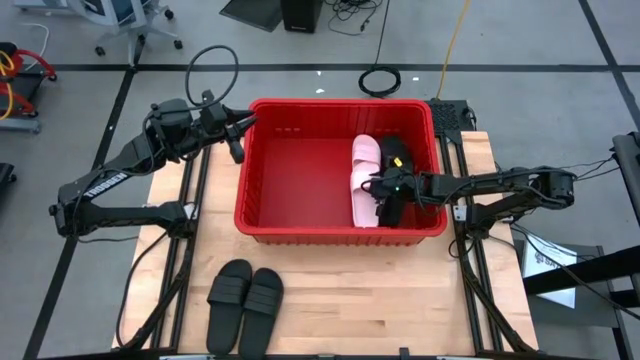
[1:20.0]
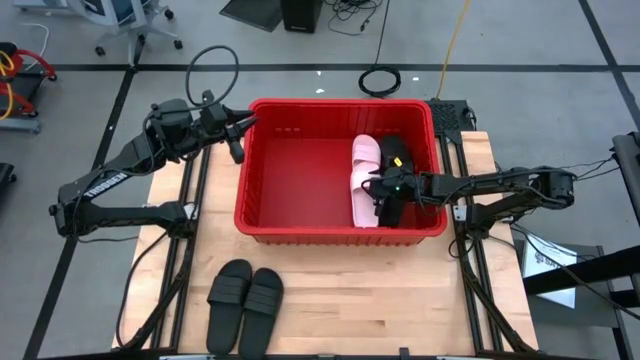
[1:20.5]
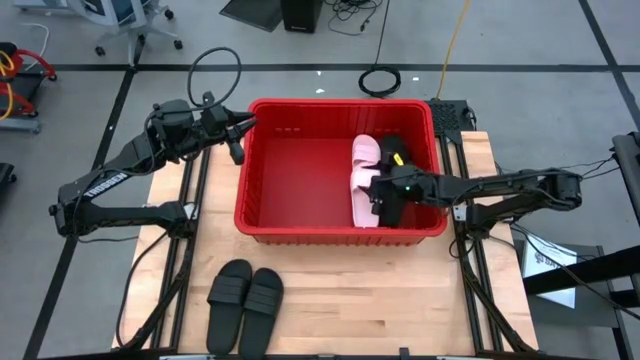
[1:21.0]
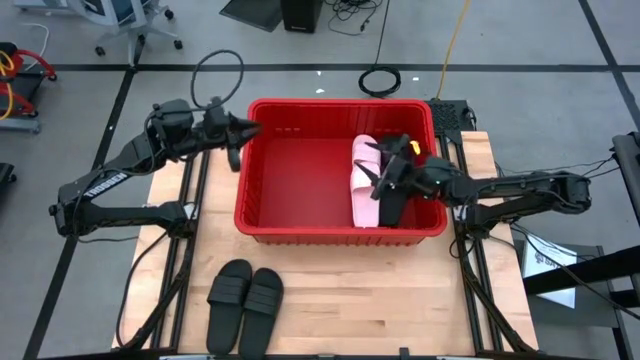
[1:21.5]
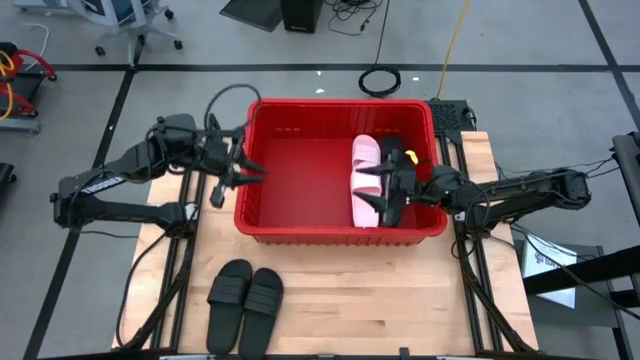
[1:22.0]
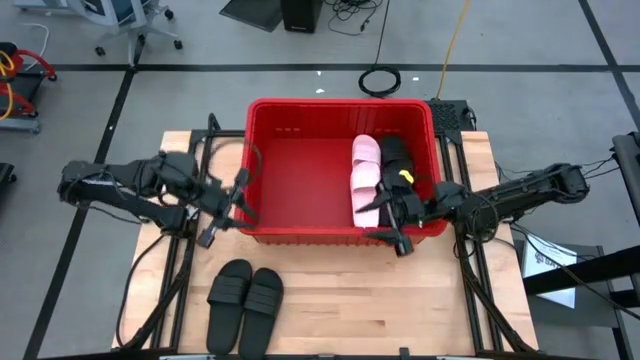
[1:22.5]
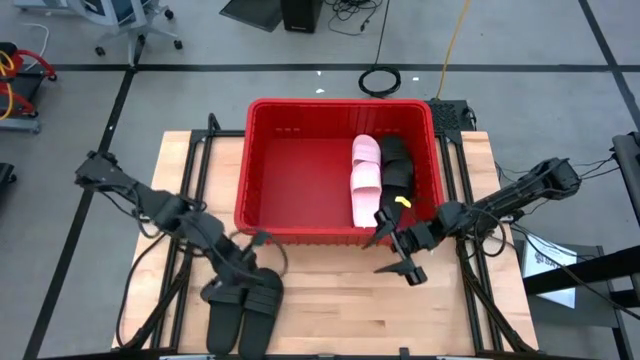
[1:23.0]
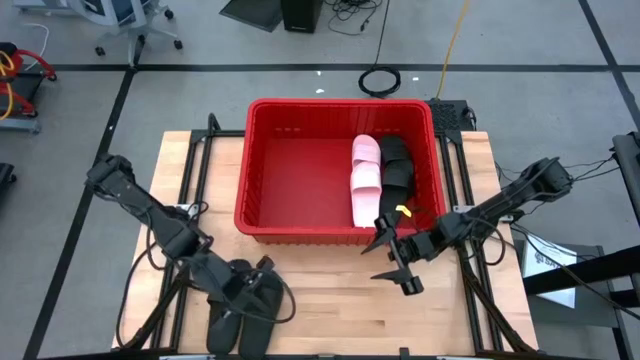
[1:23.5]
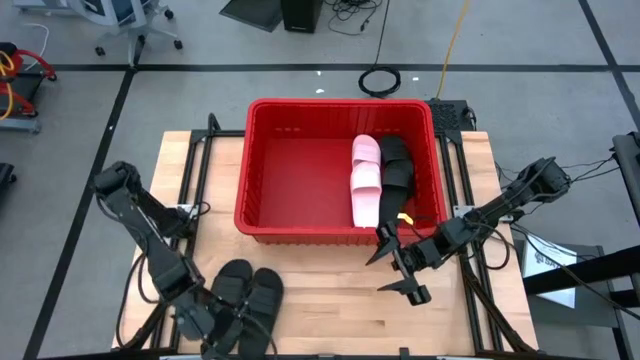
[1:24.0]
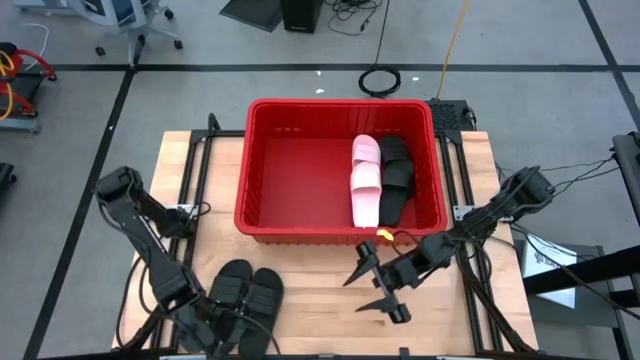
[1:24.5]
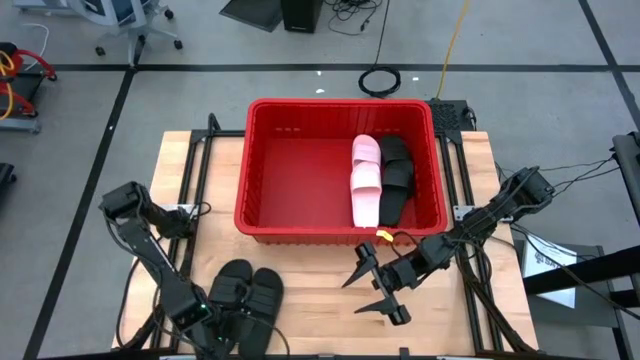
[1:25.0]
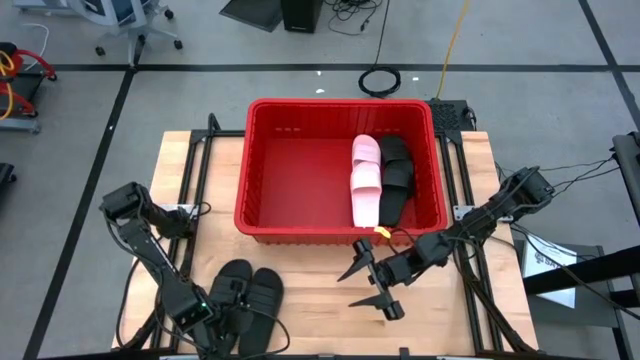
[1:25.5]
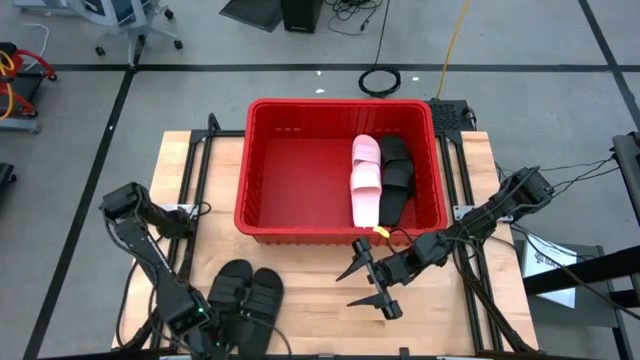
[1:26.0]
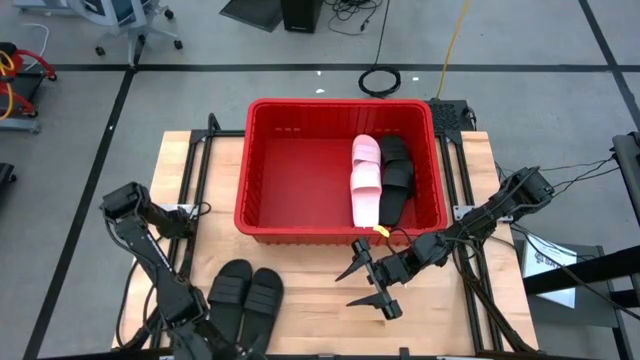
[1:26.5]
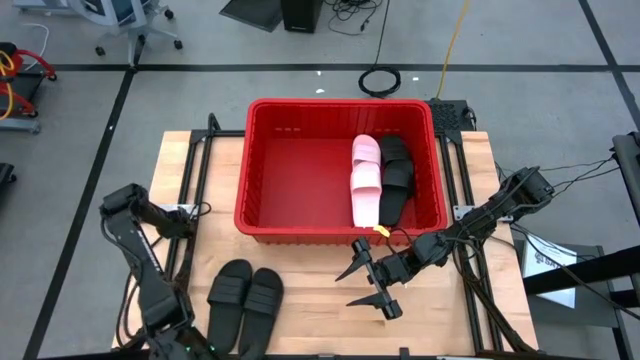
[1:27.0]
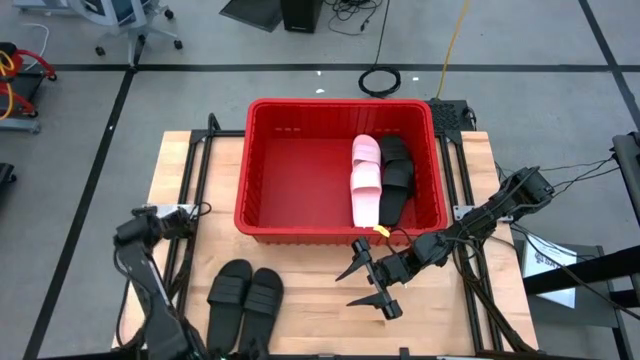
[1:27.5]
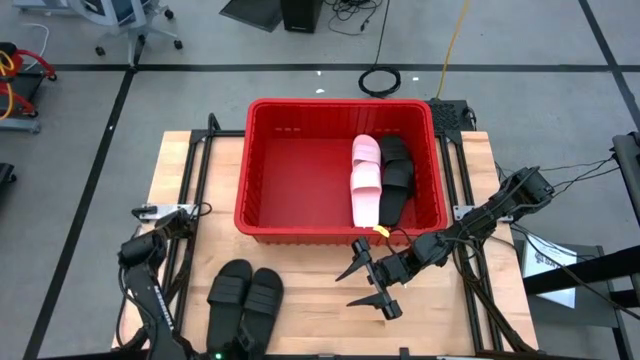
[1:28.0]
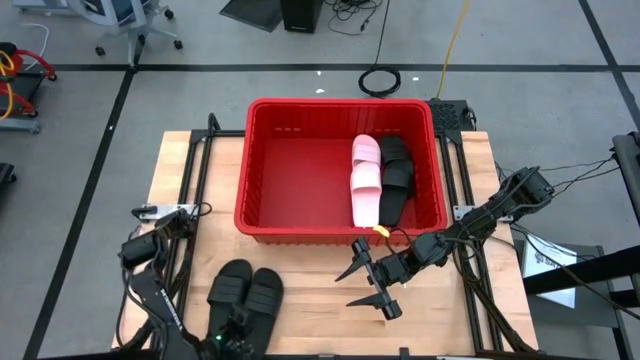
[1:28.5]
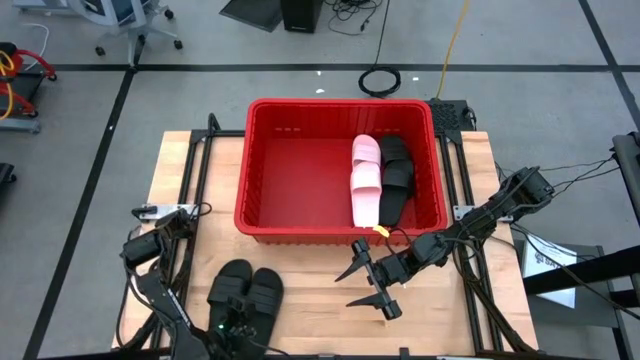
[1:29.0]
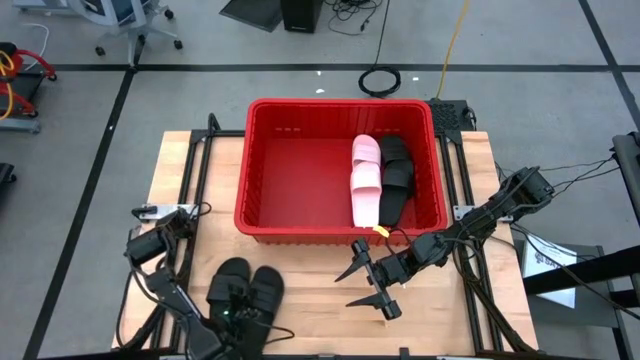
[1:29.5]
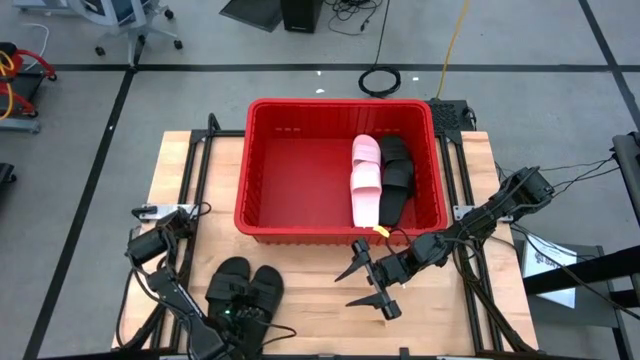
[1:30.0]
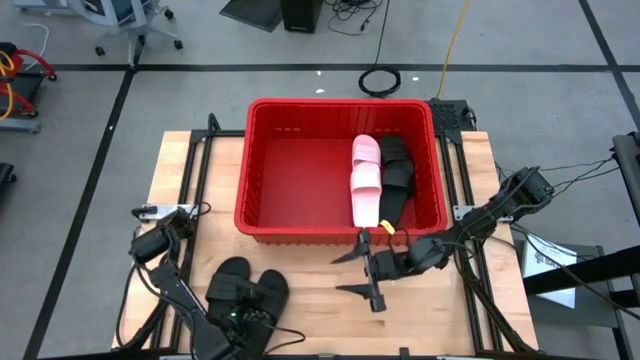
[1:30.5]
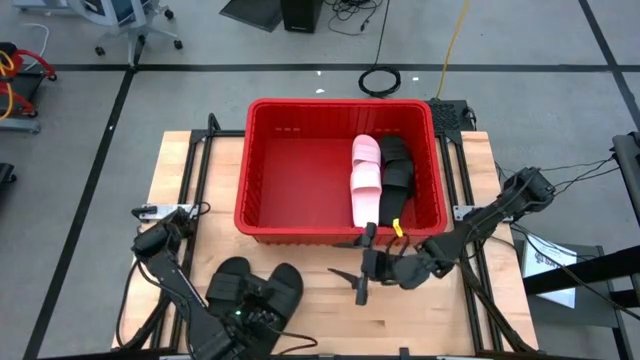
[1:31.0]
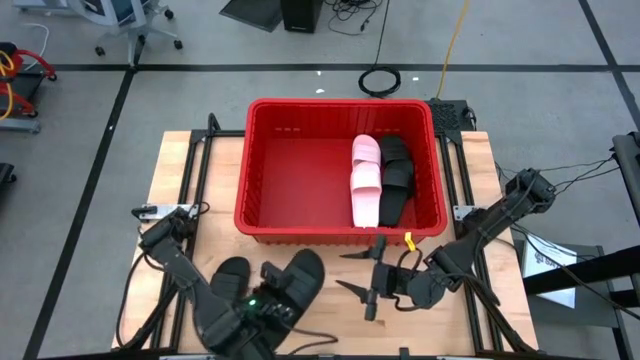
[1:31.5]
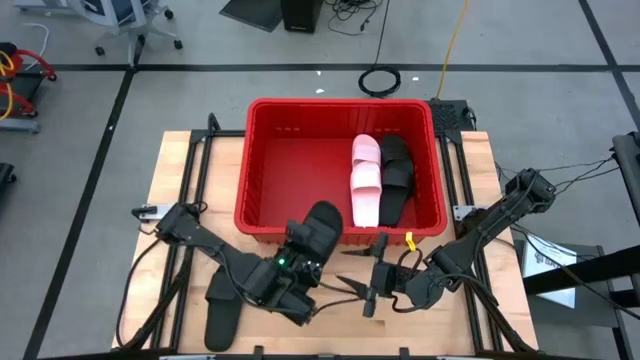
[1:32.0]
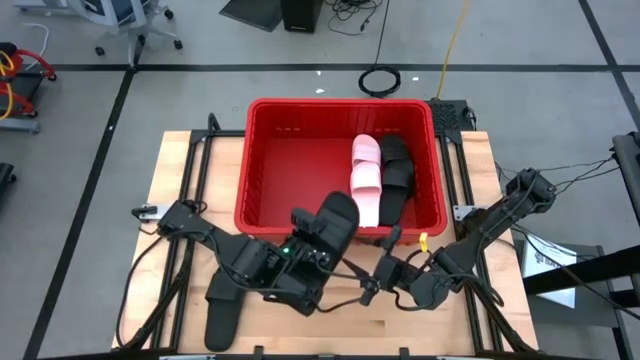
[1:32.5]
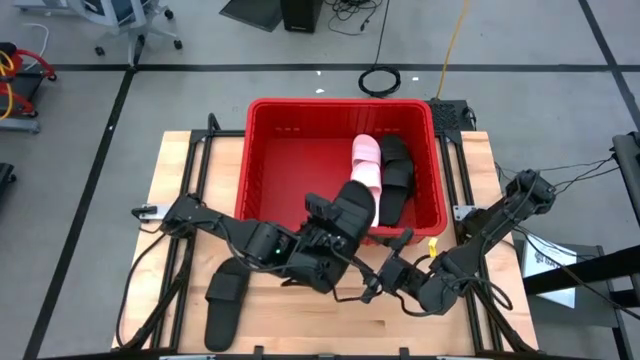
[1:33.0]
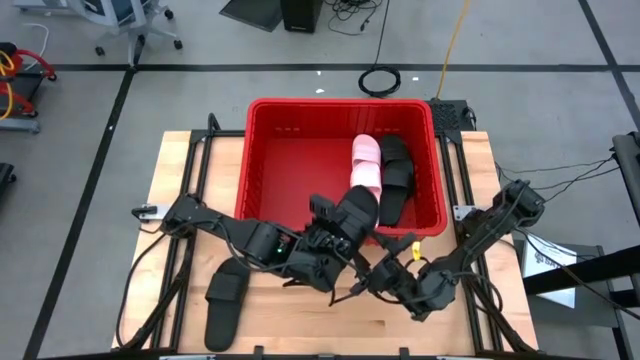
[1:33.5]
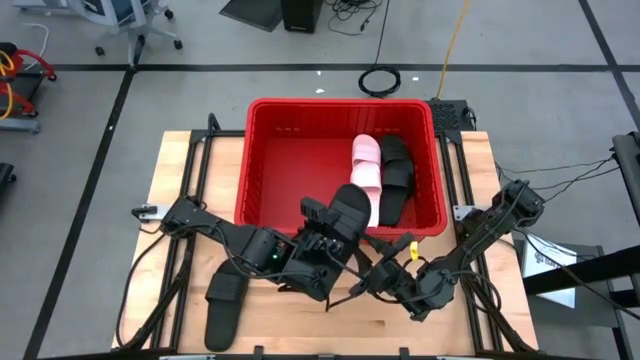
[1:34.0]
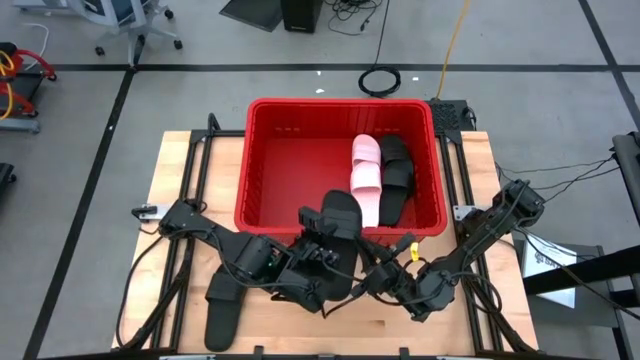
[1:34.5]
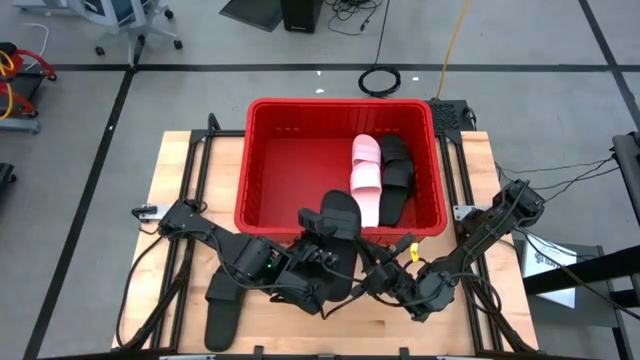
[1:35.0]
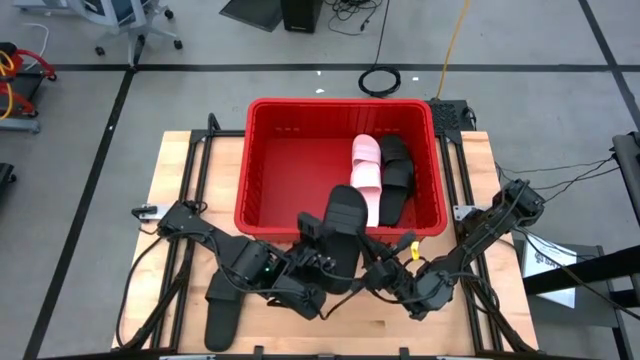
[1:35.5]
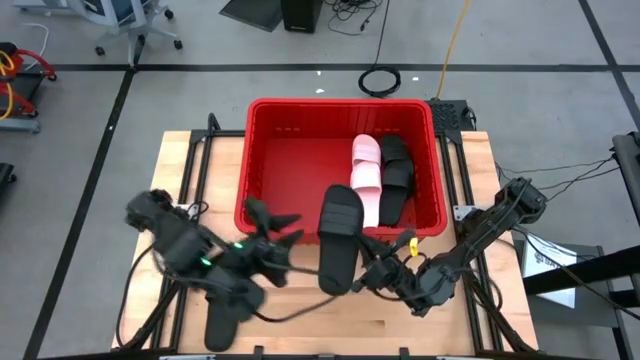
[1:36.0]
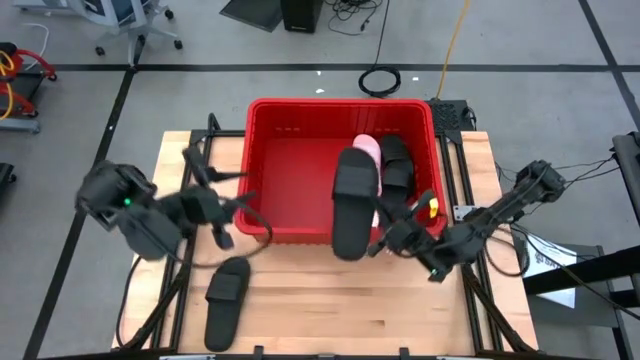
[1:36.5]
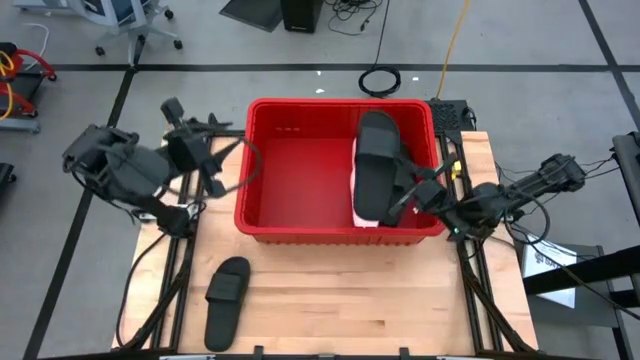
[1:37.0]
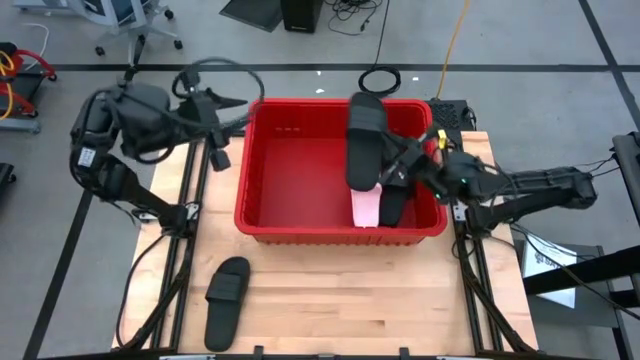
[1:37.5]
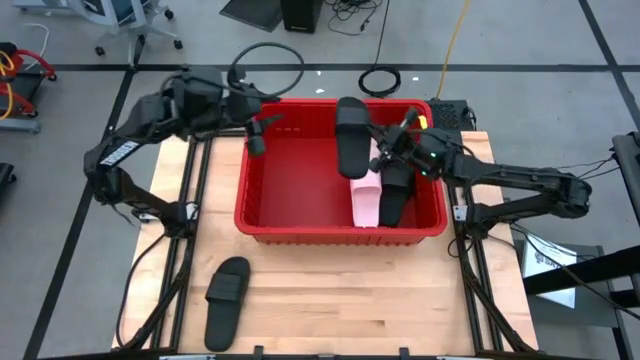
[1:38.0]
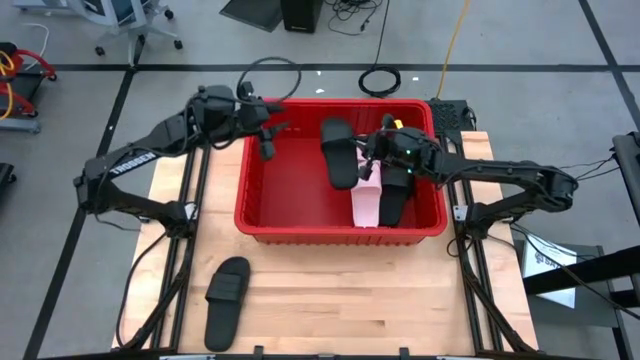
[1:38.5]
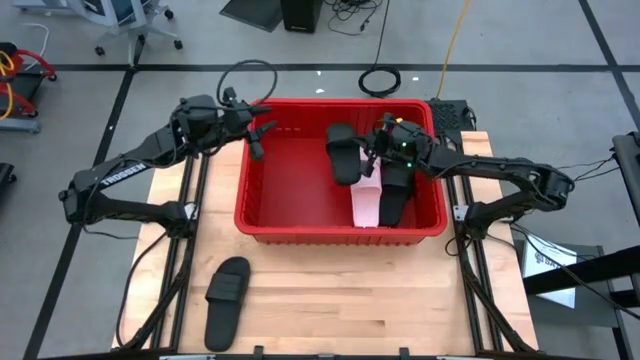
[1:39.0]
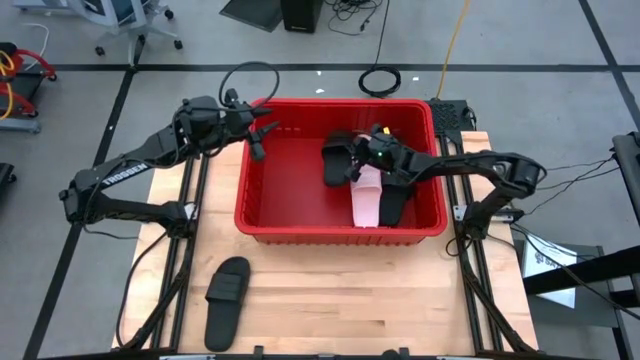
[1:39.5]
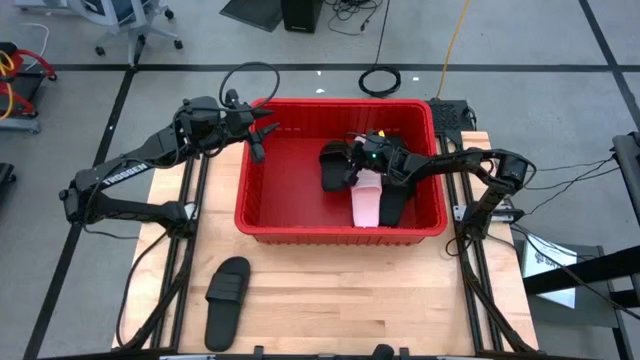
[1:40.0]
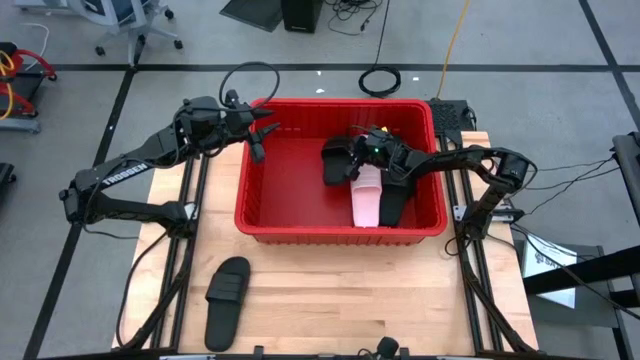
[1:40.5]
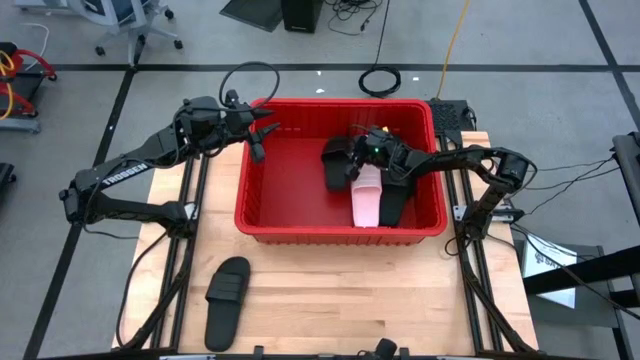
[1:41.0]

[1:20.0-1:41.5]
Task: Pick and place slides into bin
Put the black slide into the red bin
